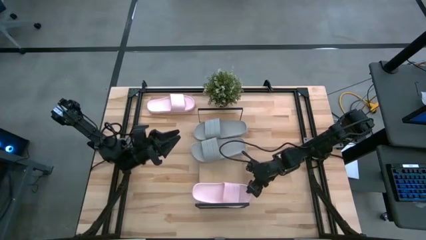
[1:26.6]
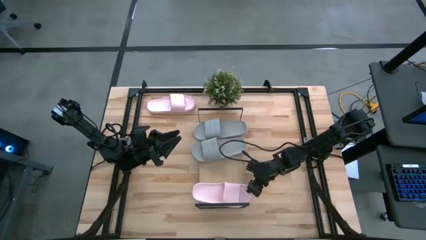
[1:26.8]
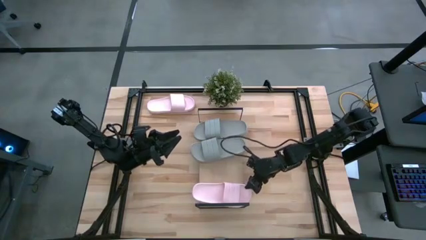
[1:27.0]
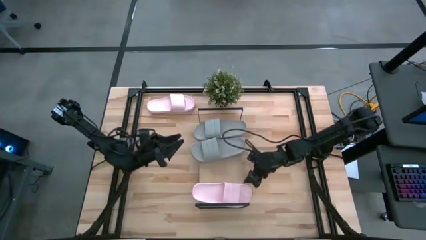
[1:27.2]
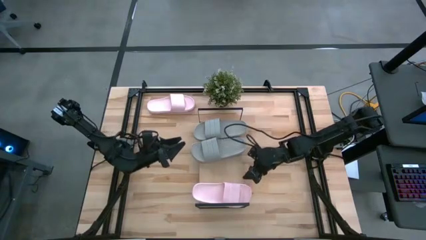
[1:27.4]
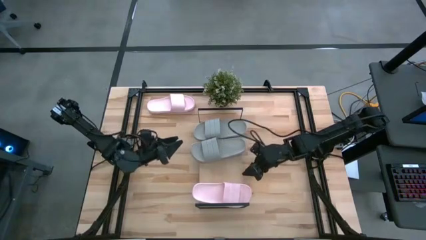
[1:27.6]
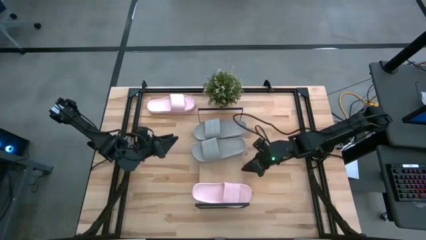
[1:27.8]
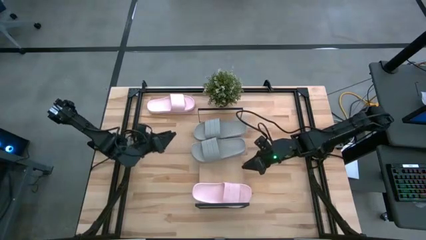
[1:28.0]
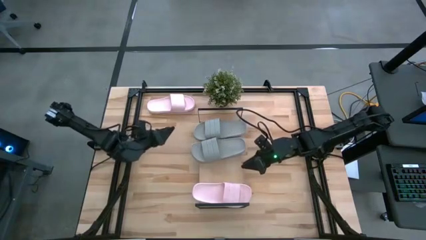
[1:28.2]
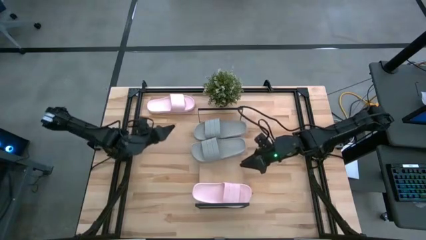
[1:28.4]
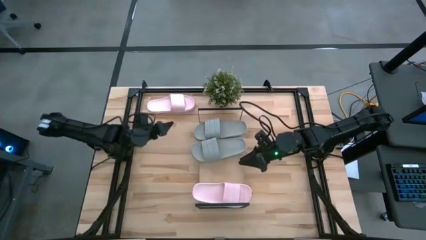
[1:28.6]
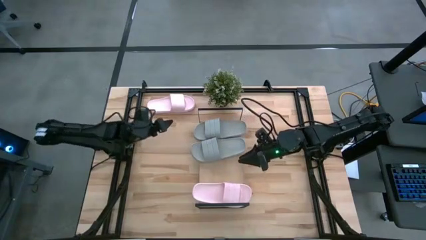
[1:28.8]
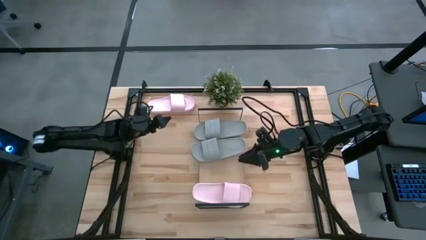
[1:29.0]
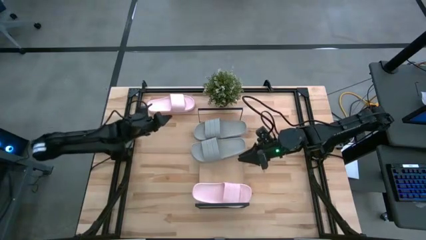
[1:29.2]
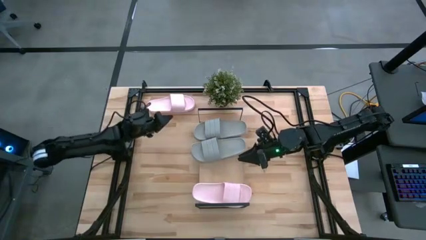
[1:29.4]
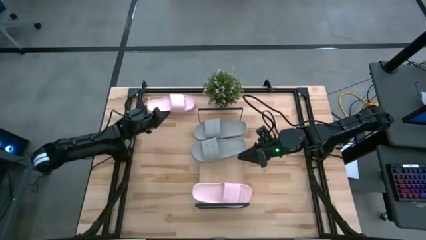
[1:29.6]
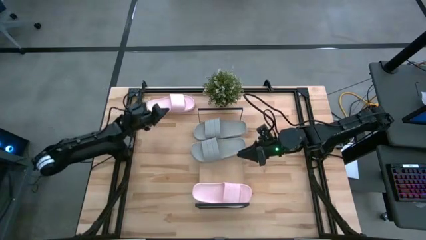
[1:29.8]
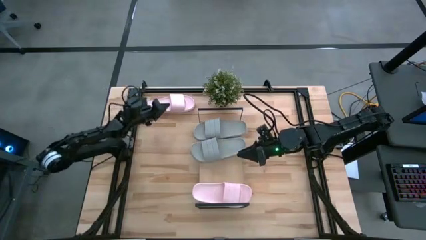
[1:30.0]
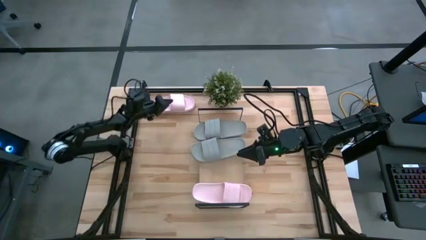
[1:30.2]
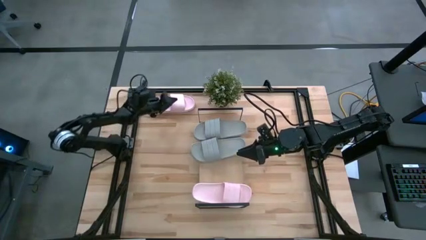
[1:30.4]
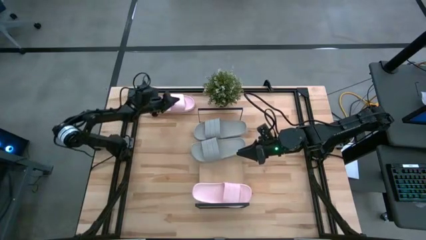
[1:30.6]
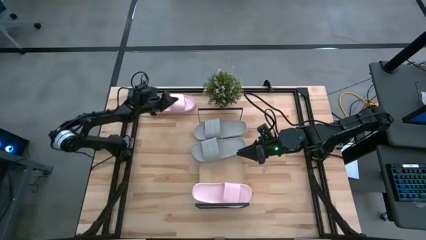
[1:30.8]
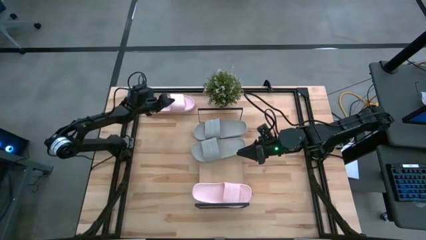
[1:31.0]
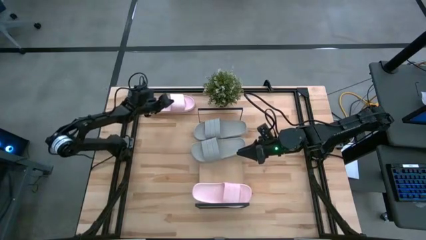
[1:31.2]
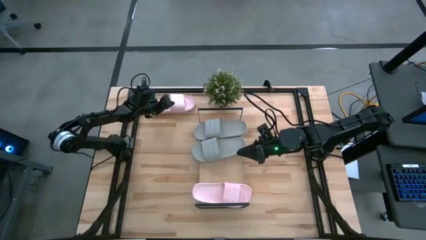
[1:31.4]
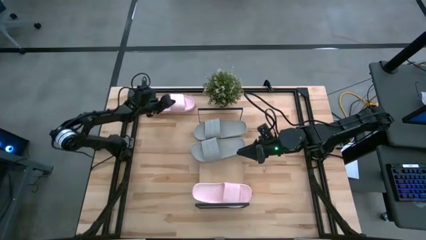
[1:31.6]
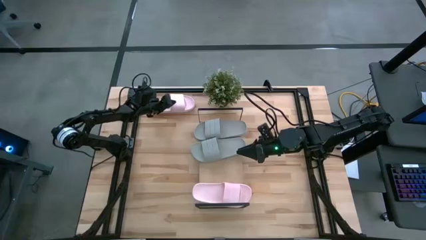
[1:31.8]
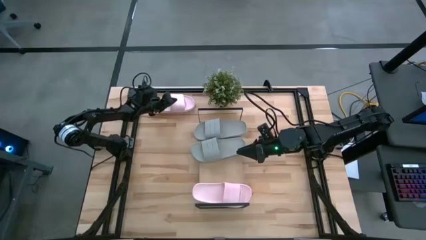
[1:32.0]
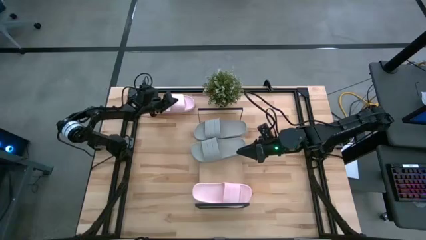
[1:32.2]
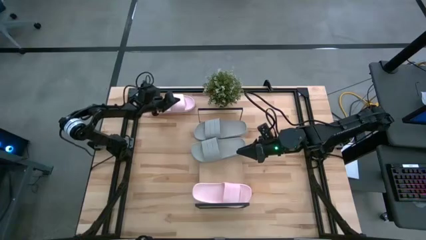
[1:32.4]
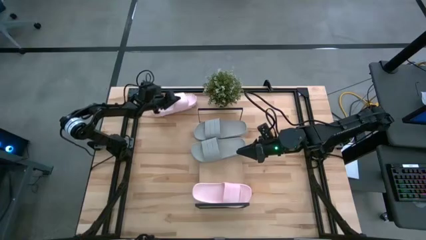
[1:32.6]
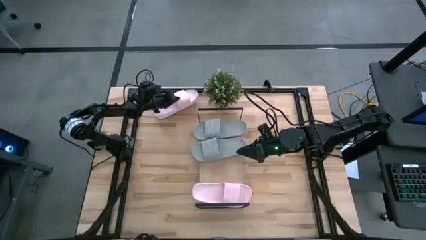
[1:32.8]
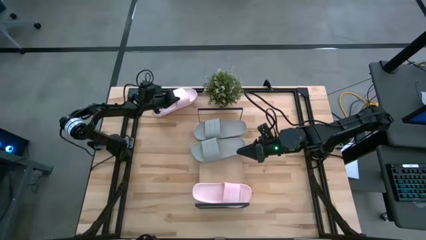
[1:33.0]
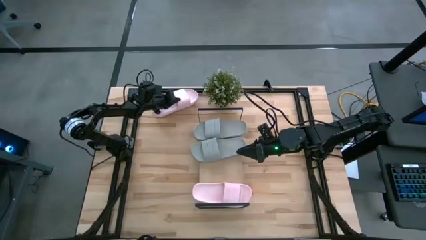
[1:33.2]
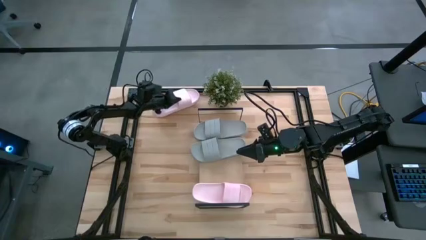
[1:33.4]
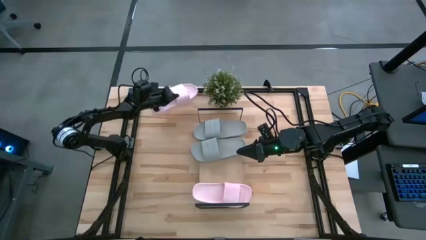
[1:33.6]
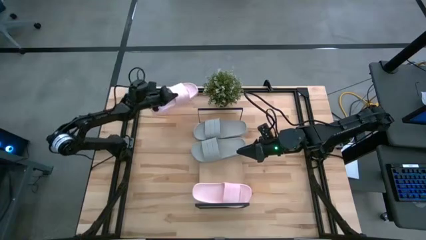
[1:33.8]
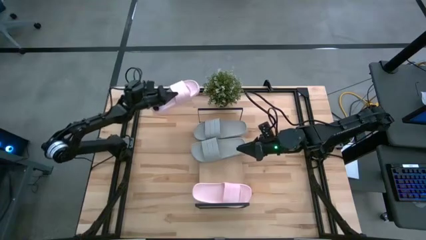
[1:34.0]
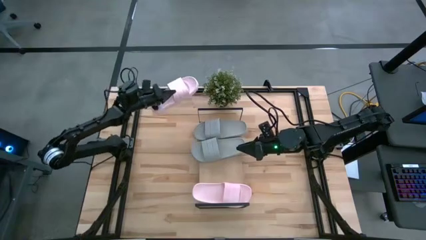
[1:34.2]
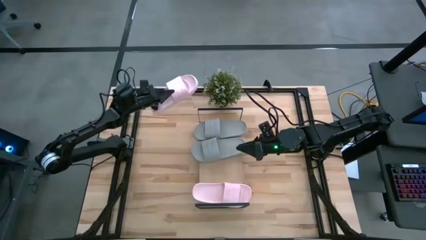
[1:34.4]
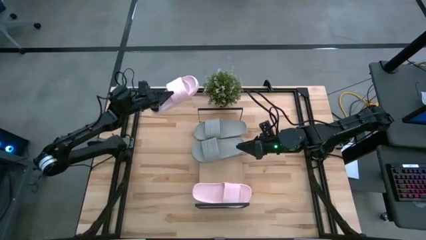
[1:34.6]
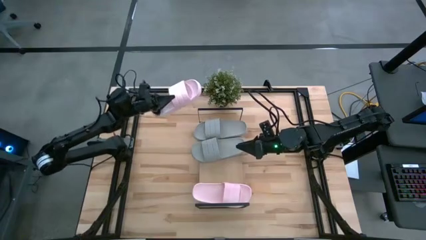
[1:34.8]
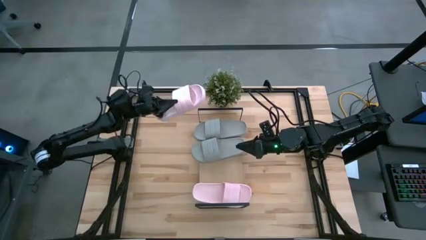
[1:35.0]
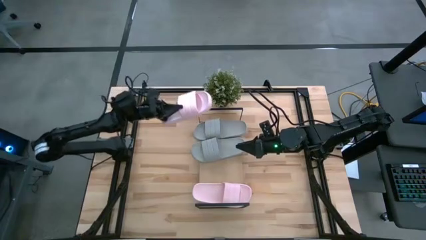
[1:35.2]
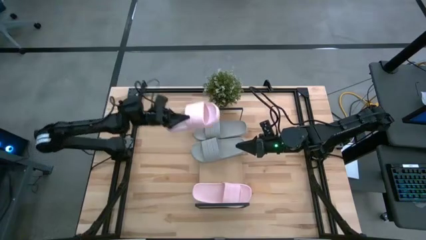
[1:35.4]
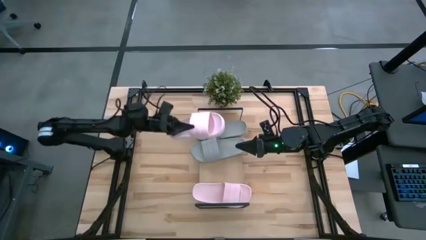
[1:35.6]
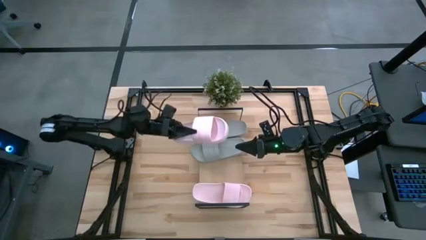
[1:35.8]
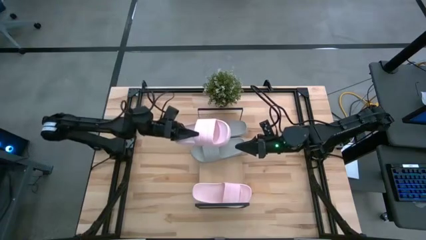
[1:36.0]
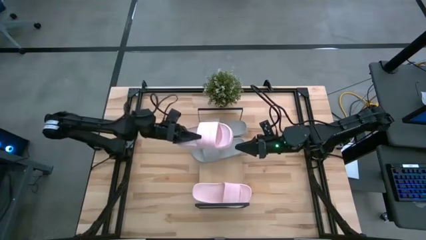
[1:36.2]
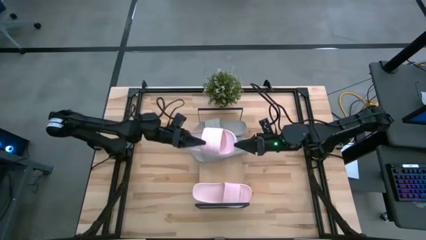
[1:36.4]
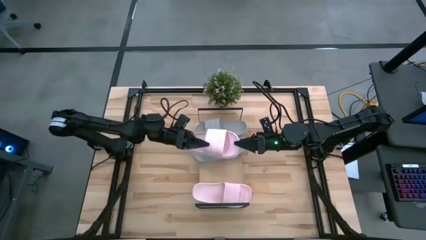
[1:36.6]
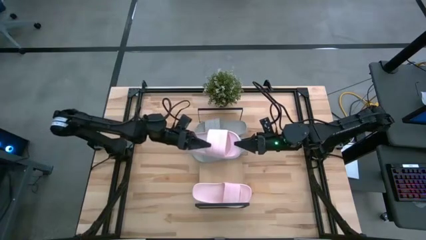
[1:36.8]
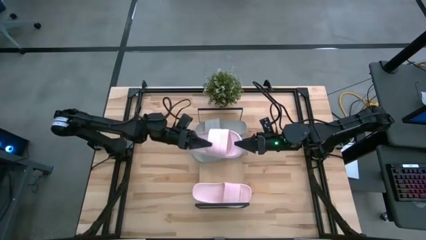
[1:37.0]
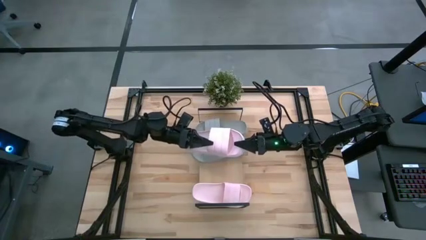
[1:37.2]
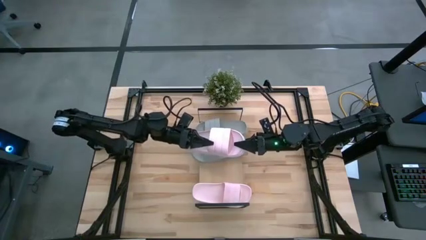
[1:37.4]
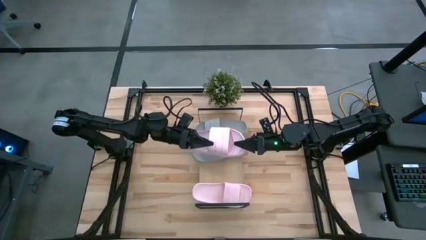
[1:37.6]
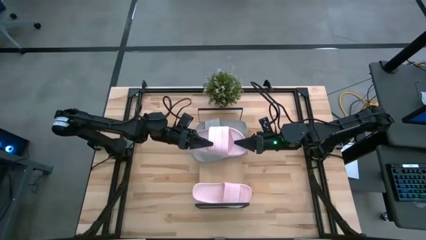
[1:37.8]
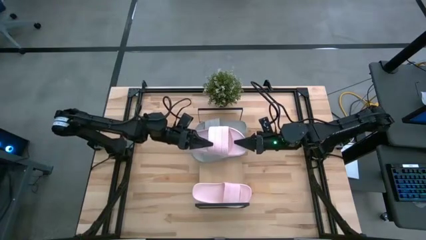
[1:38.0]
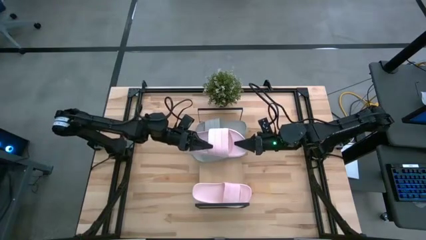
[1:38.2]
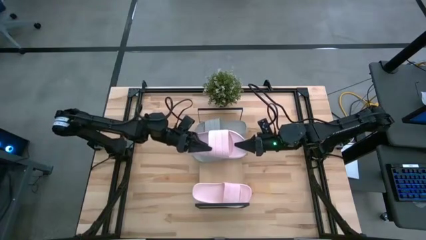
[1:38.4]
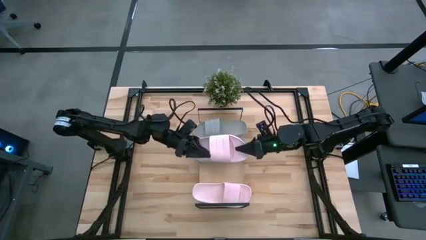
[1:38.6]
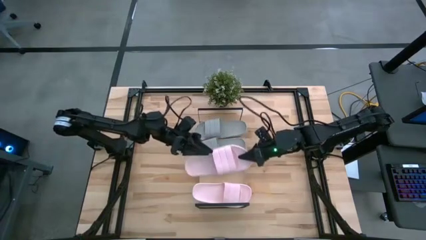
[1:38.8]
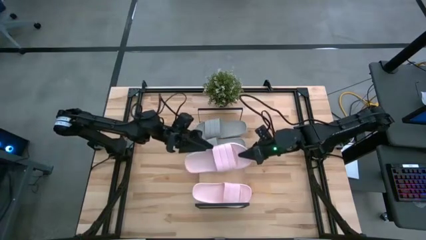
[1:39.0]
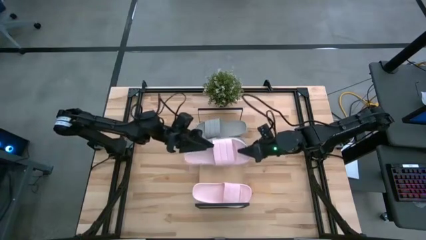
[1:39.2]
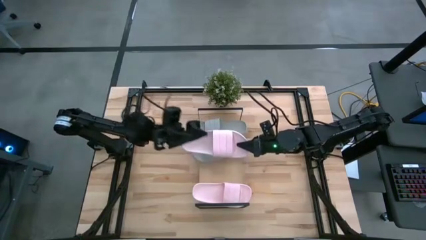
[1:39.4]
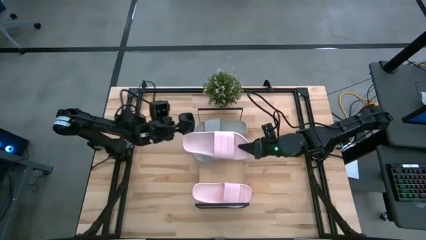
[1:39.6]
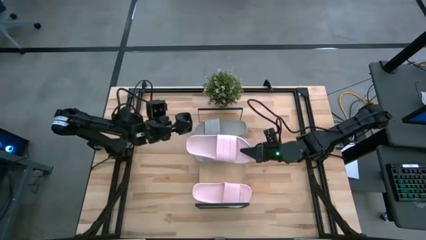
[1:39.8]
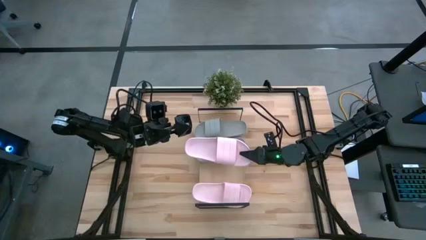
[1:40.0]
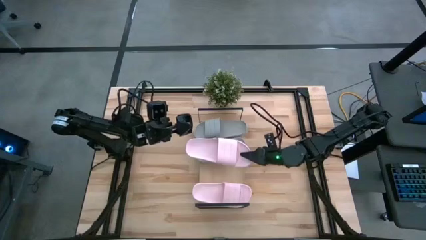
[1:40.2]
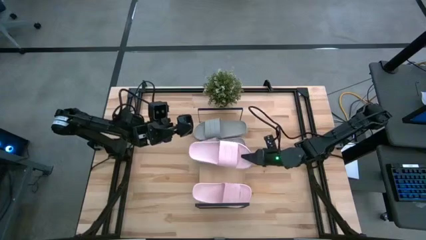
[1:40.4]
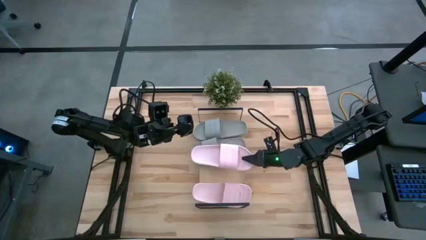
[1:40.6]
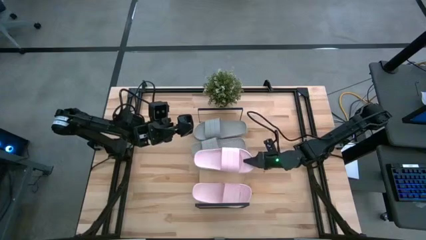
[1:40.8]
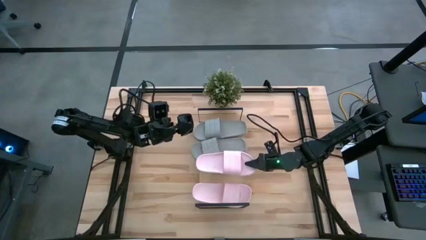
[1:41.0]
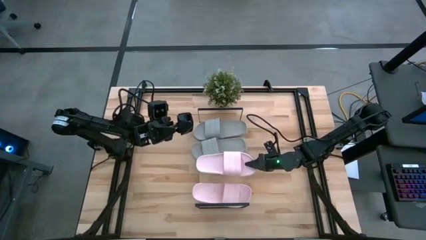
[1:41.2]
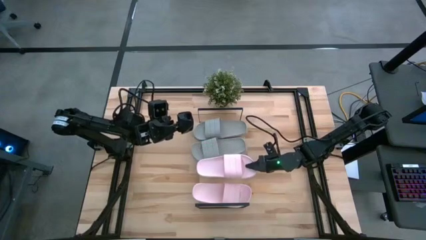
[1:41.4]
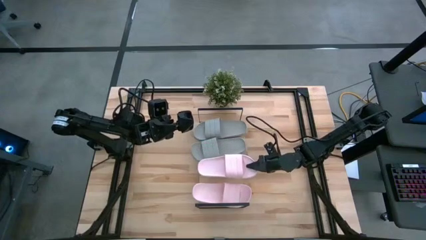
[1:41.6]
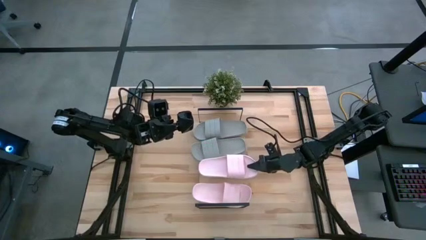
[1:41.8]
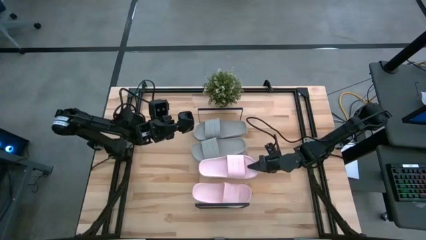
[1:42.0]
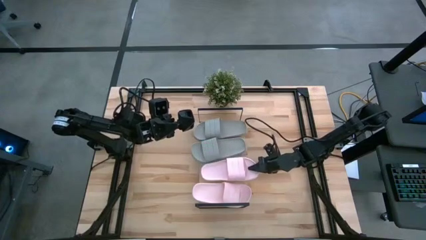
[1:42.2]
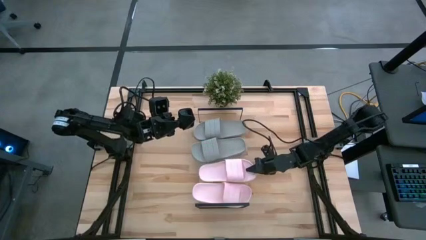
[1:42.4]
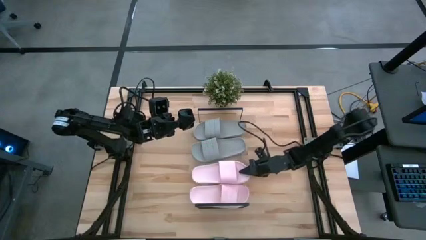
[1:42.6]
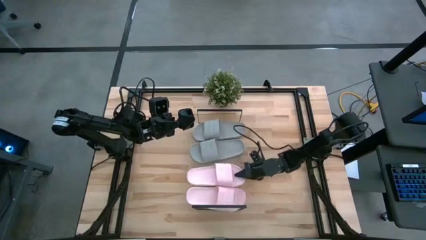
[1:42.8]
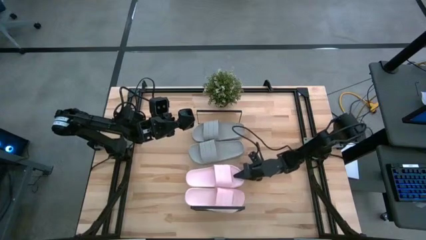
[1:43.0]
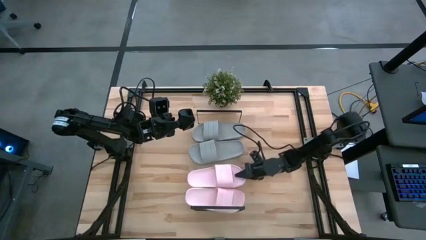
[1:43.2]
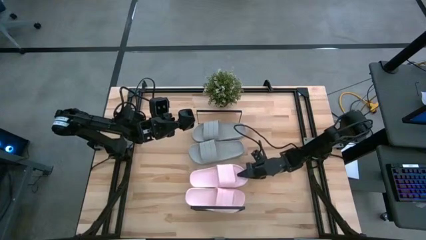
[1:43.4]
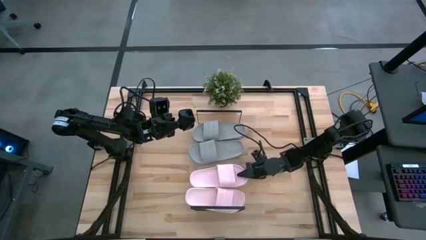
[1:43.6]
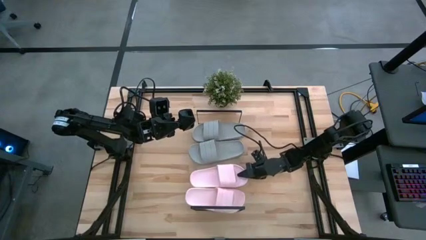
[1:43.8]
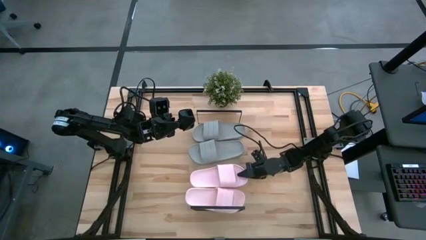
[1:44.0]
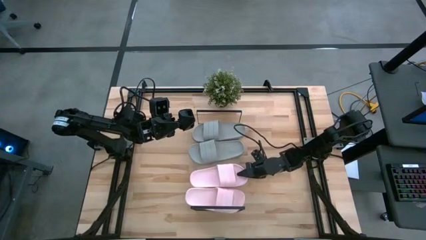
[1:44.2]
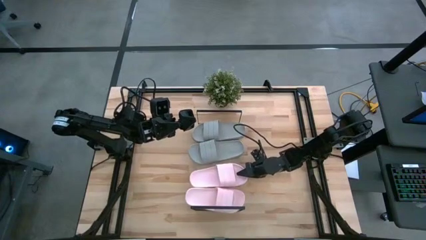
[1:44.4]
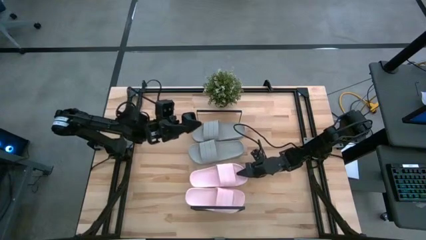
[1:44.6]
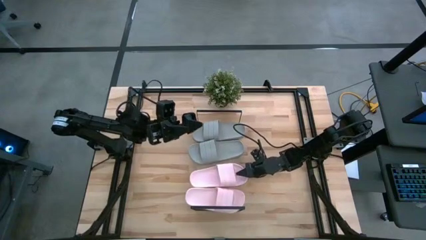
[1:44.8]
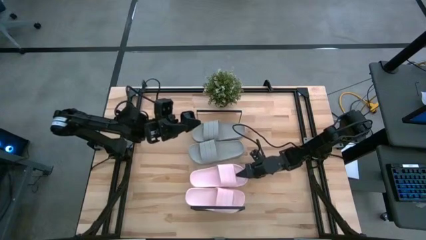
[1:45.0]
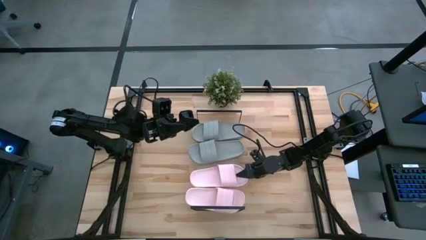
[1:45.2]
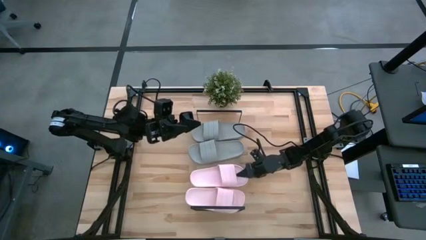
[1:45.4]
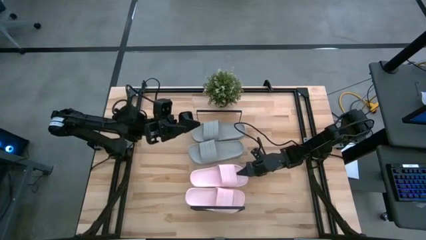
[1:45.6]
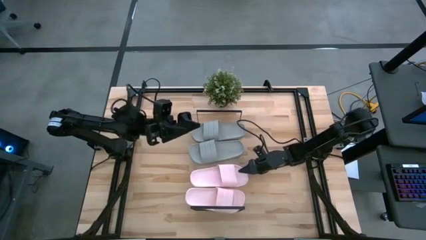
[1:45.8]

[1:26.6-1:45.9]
Task: Pick and place slides into the shelf
Put the pink slide on the shelf
